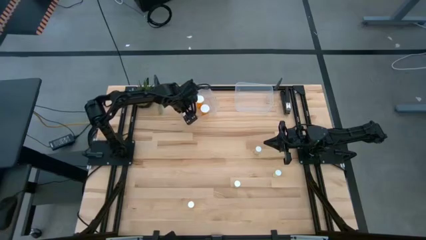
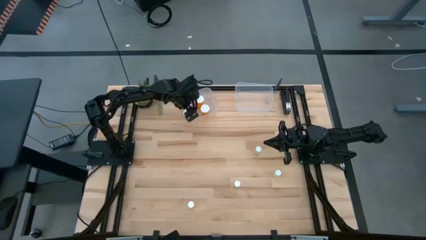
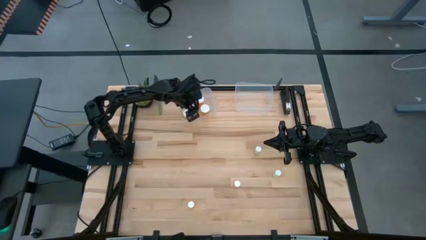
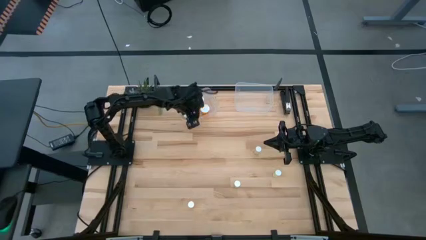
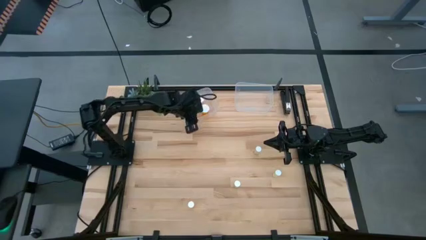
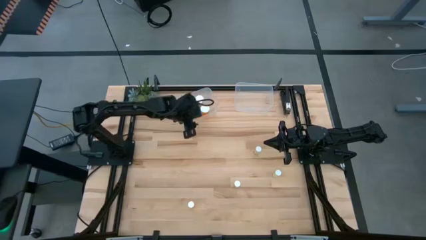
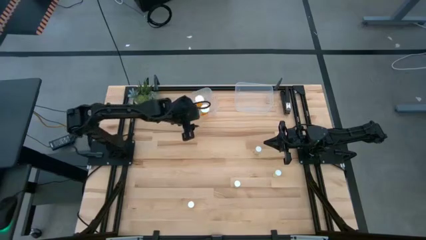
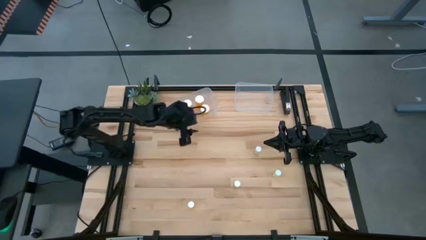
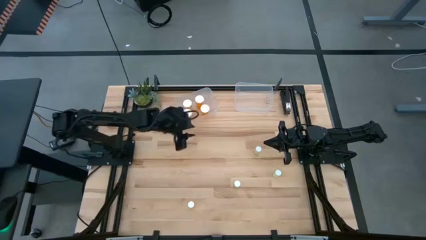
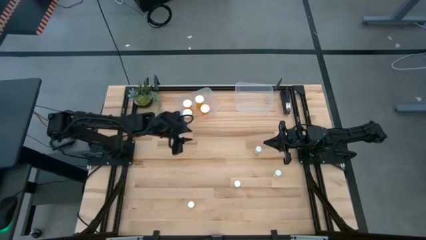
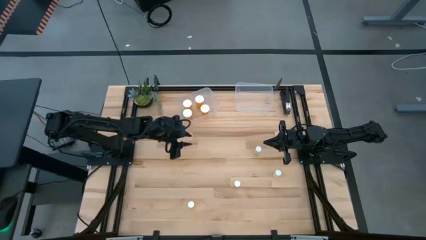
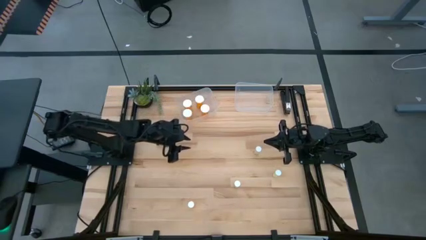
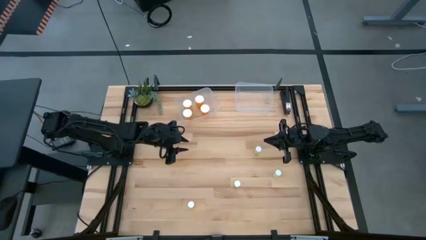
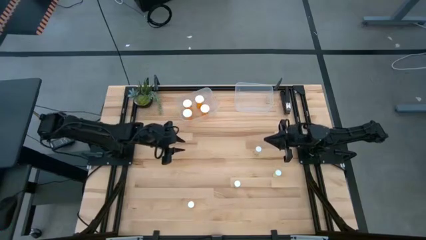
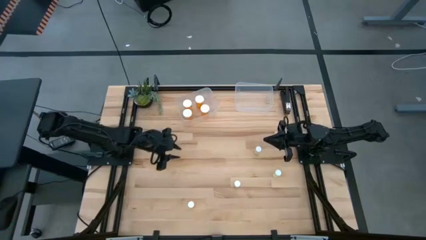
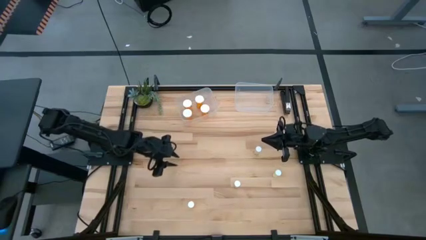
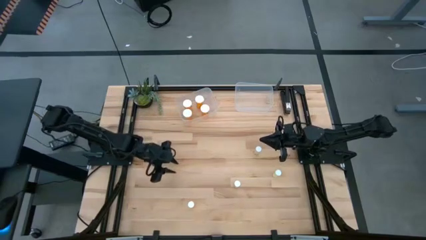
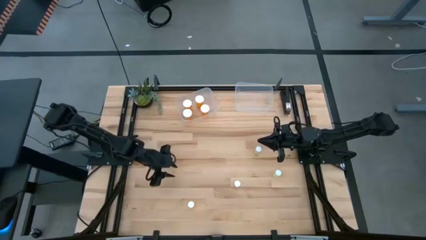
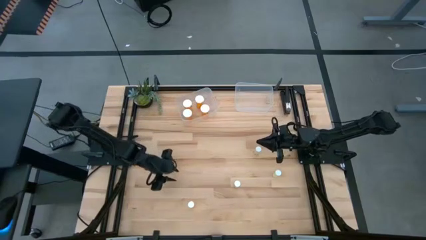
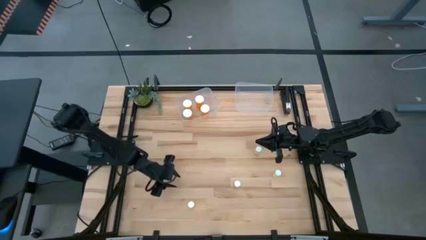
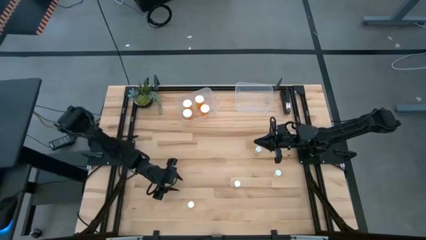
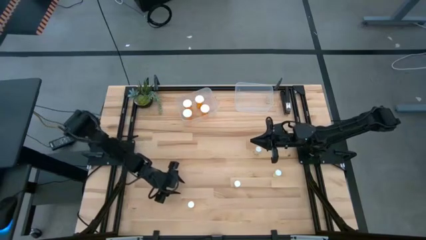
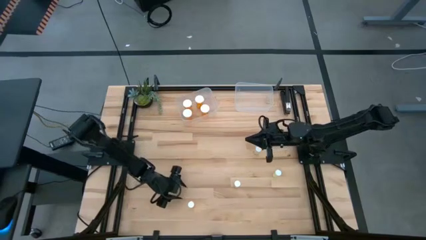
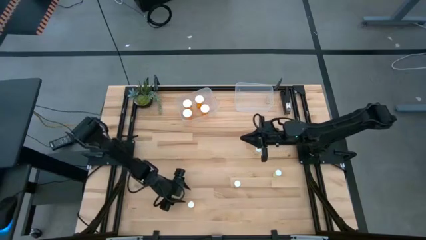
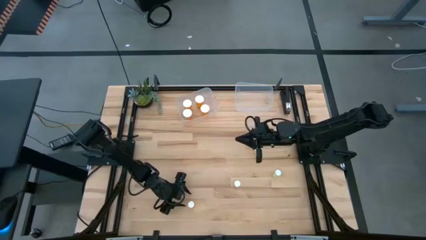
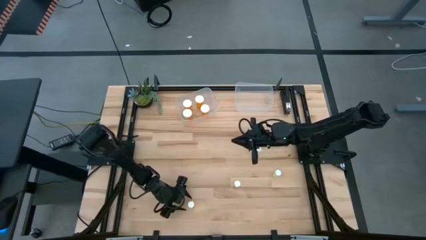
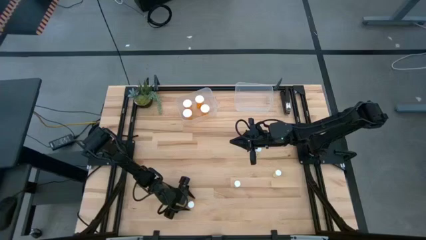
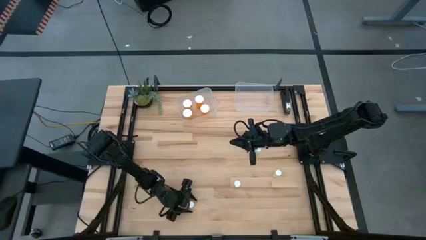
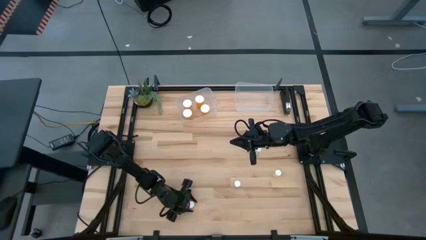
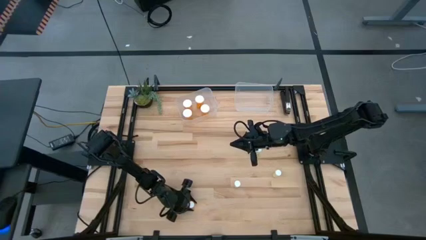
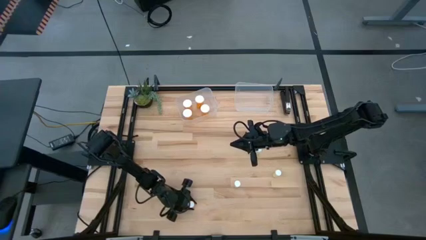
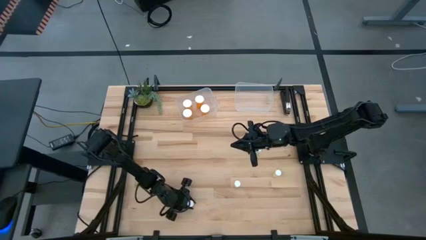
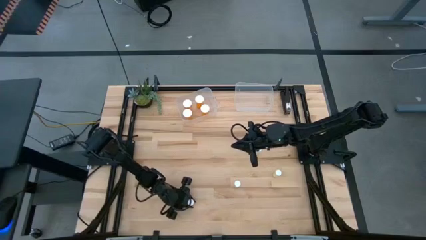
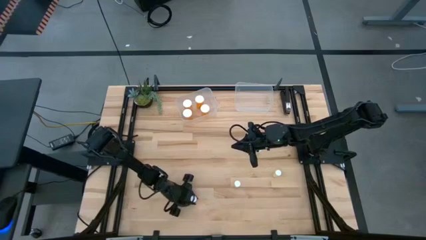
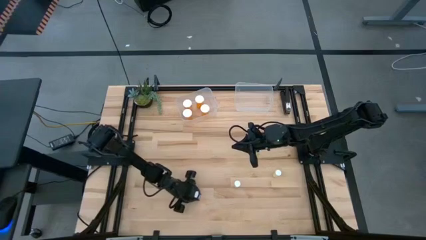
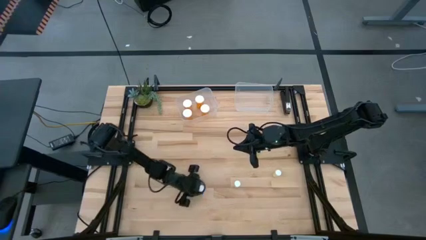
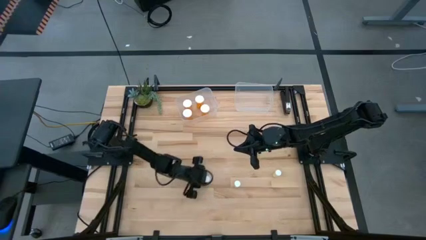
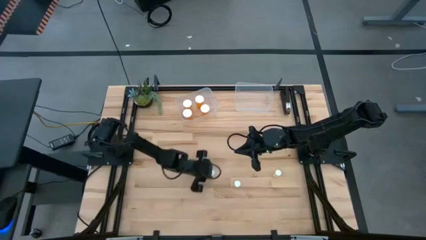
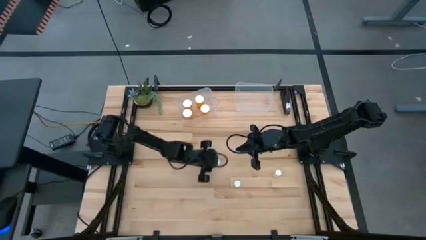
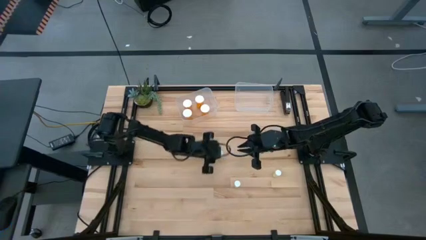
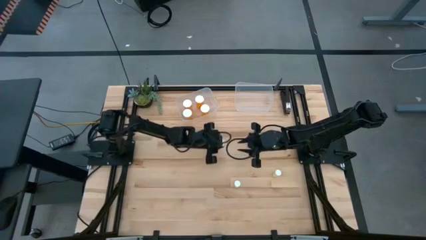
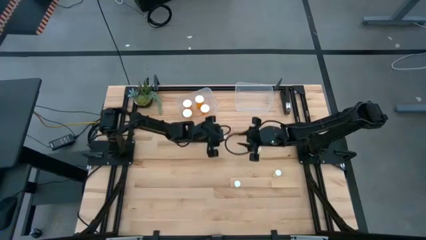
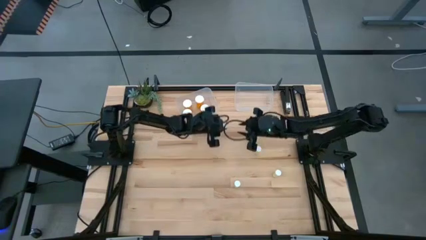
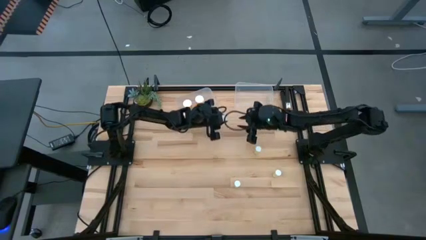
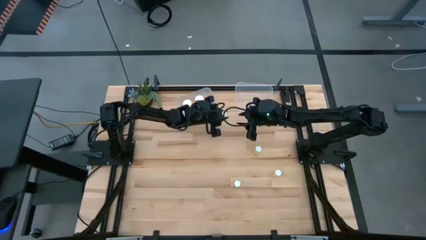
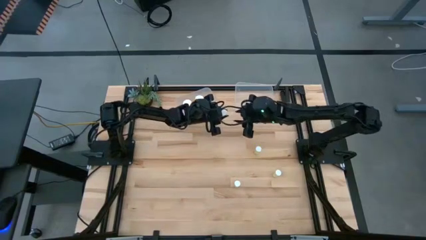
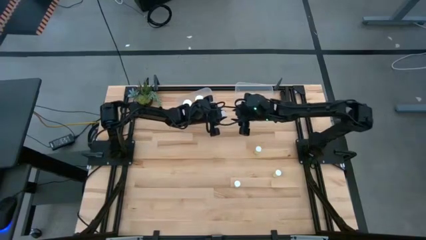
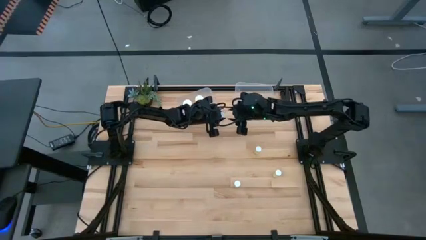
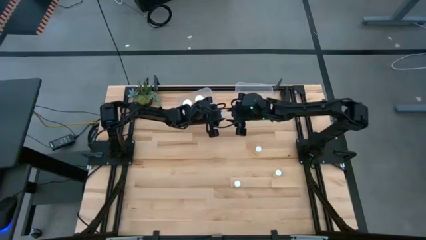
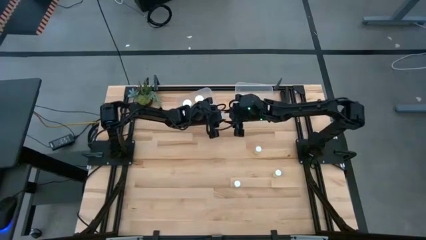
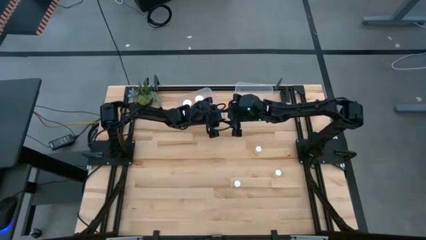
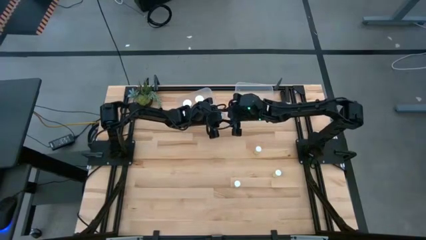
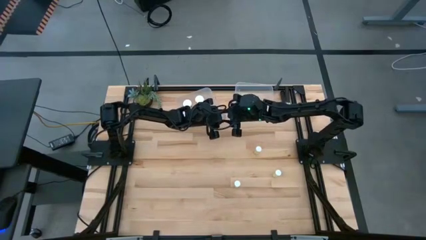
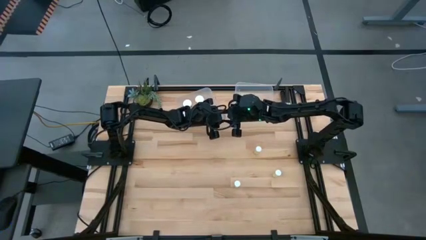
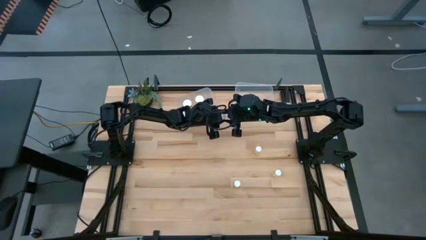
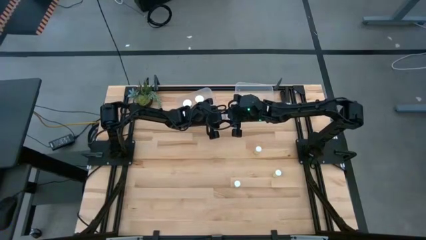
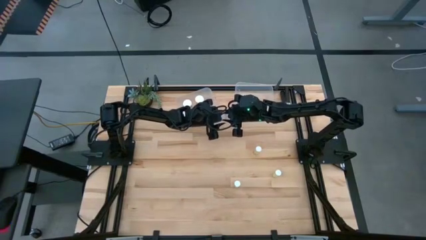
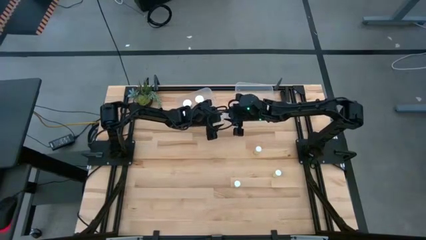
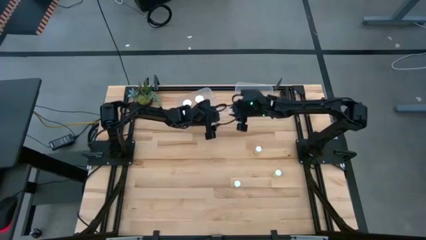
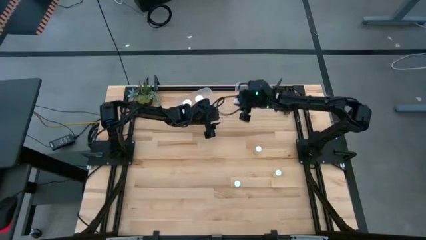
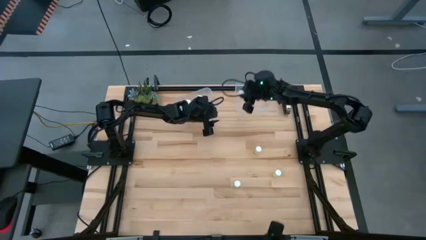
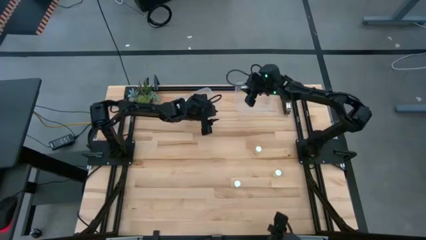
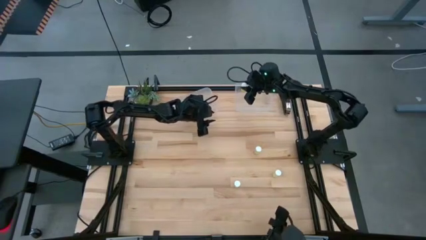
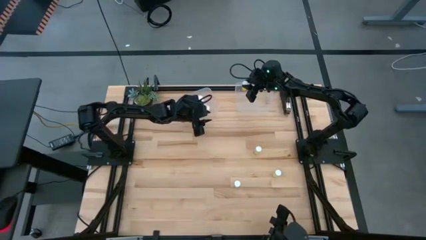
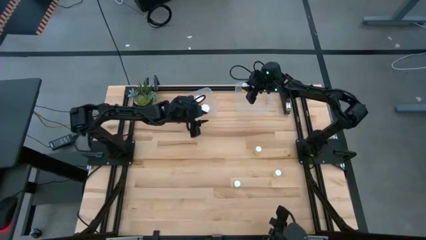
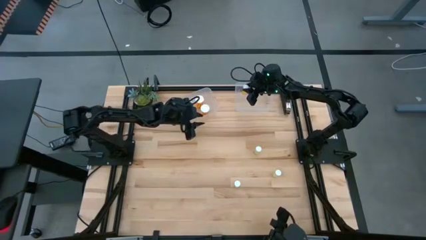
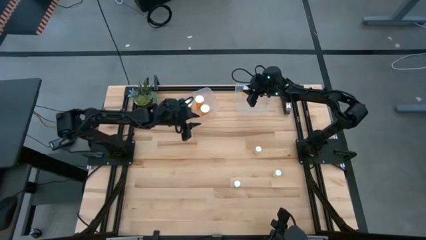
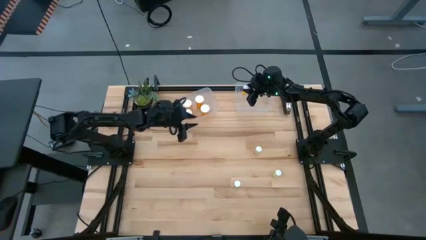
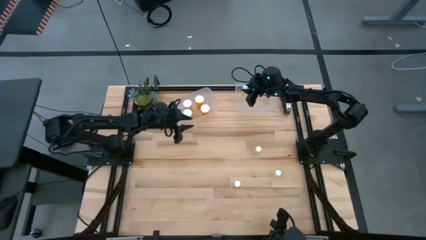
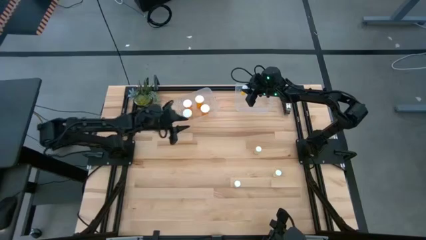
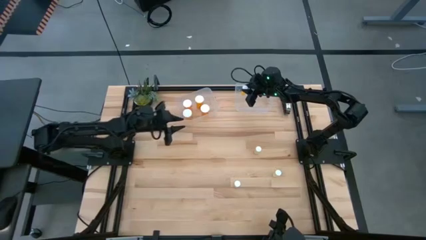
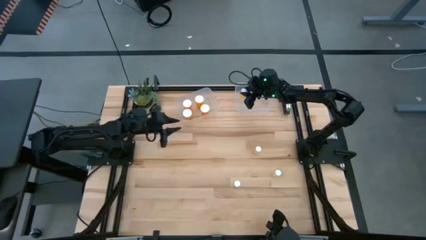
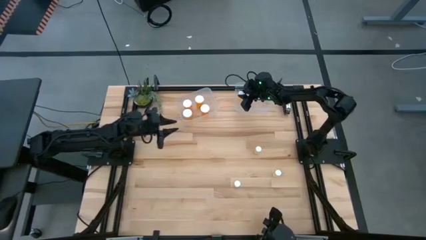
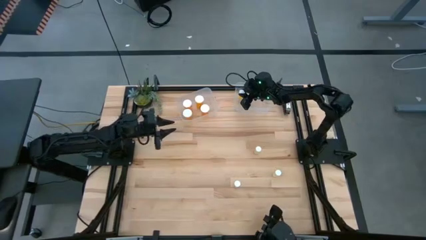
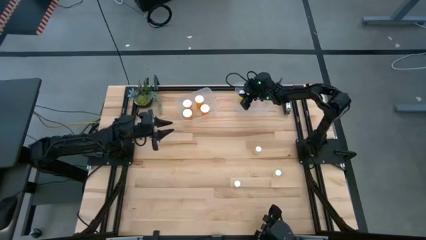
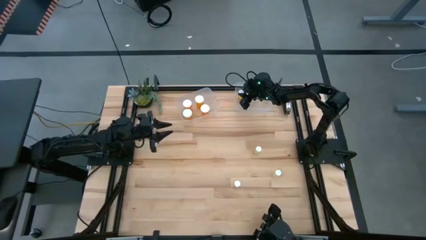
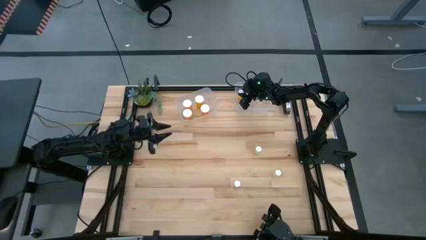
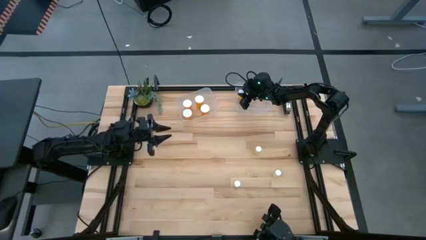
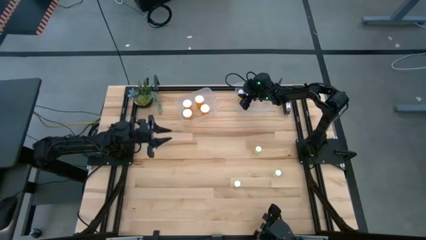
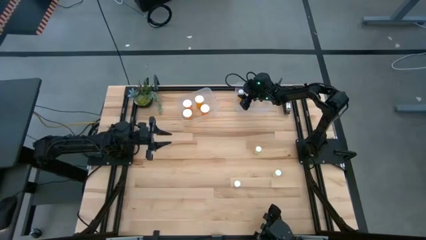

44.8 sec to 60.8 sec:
Task: Pick and place medicine bottles into bin by pill shape (circle, oval)
Put the orange tablet bottle into the right transparent bin
